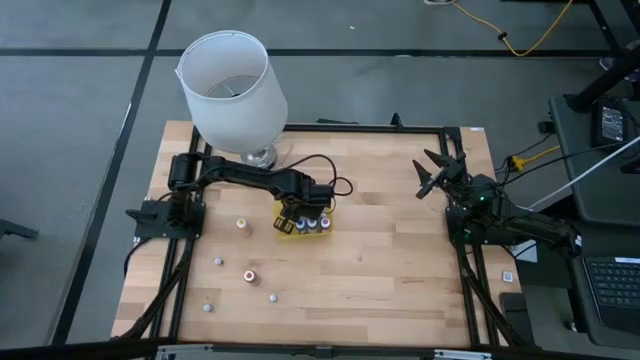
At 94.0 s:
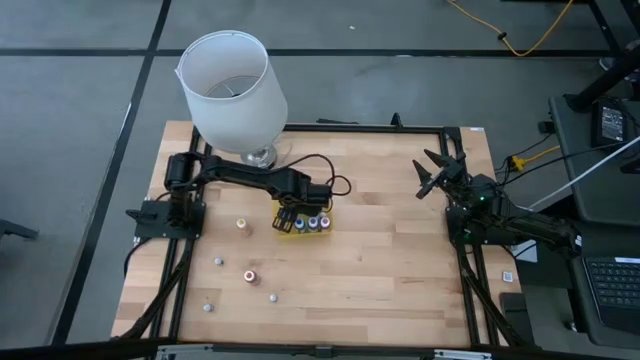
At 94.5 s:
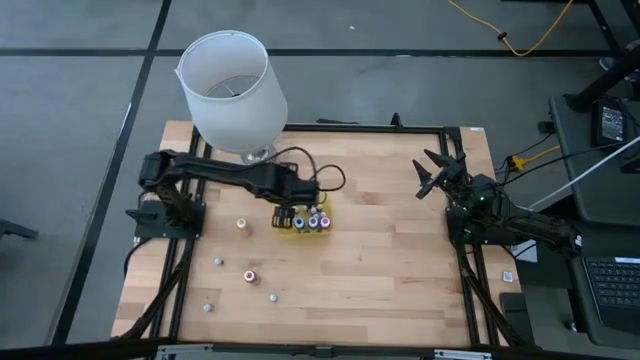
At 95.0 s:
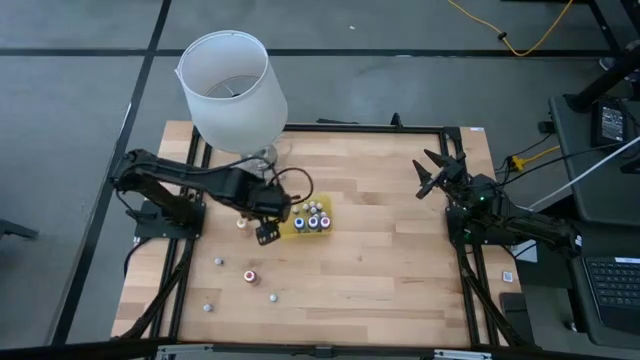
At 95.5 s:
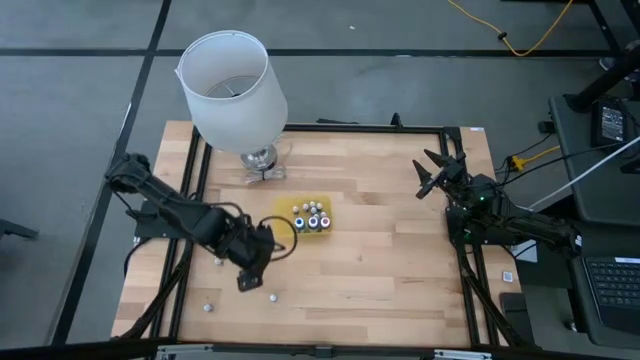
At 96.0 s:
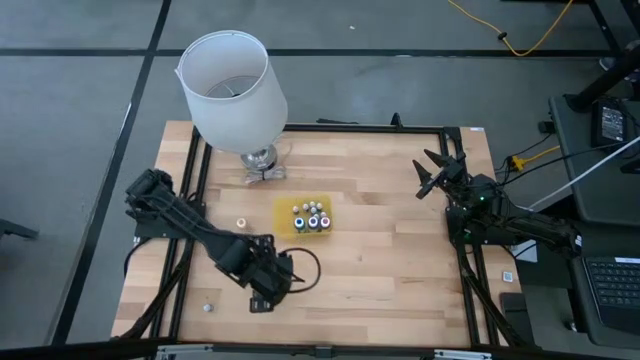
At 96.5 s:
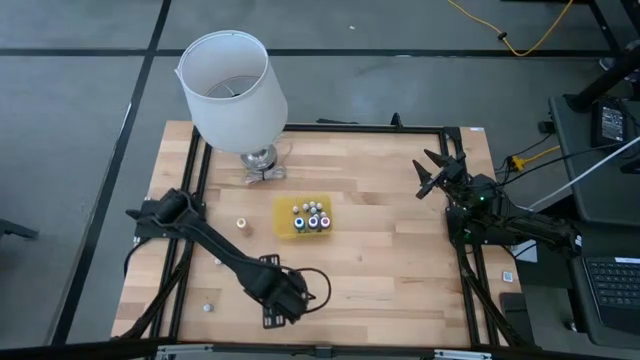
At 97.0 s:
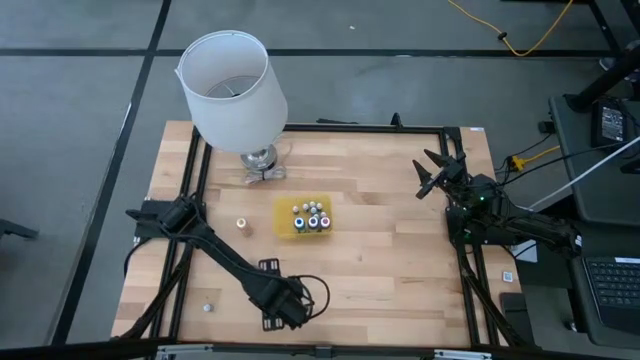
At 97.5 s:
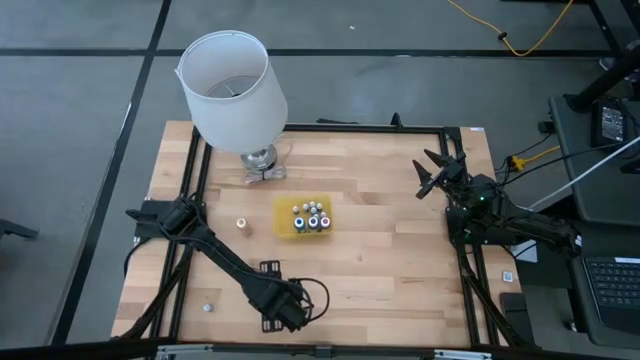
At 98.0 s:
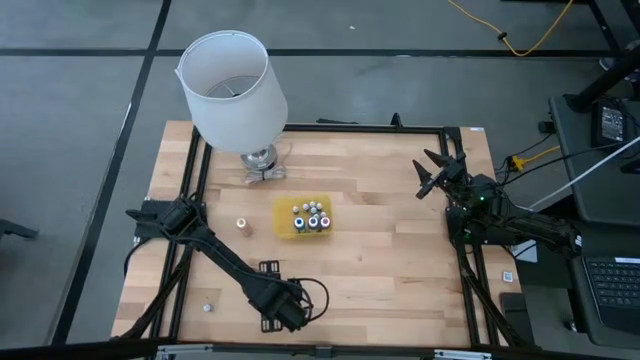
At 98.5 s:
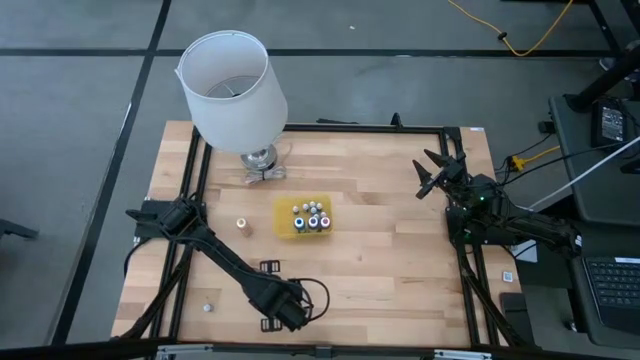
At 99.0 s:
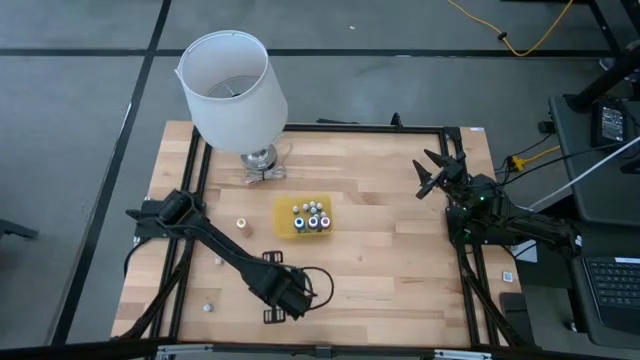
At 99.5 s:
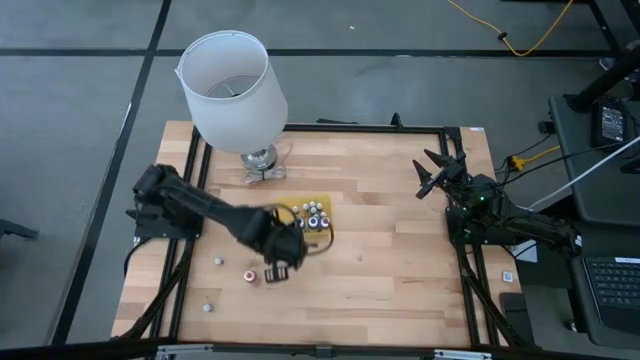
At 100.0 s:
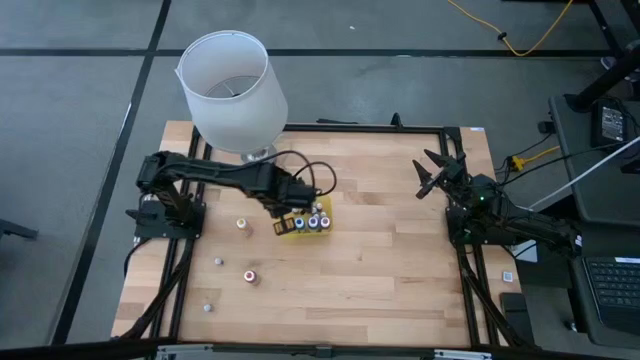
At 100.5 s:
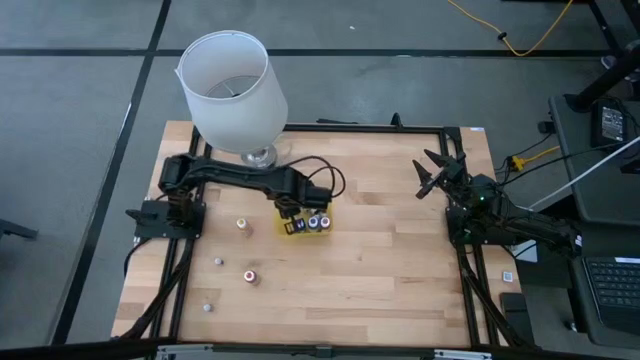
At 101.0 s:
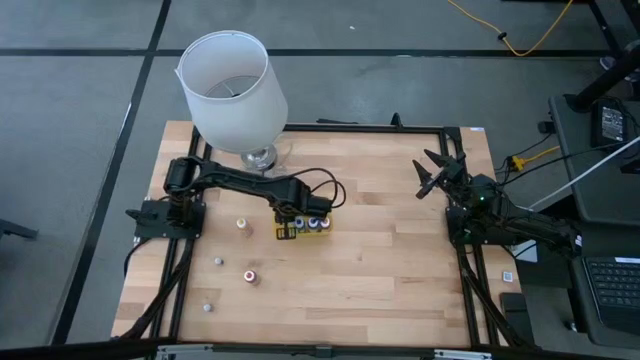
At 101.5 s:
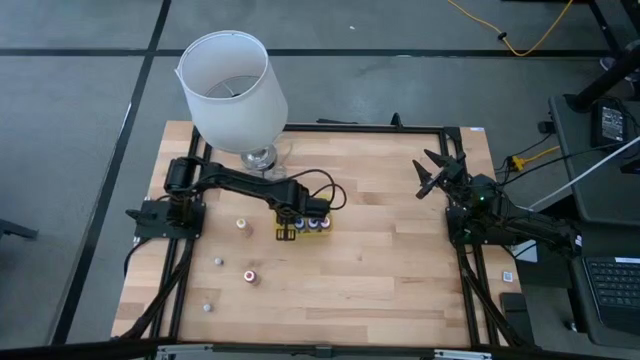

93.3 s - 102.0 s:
Task: Pick & Place food coloring
Put the black food coloring bottle into the yellow bin

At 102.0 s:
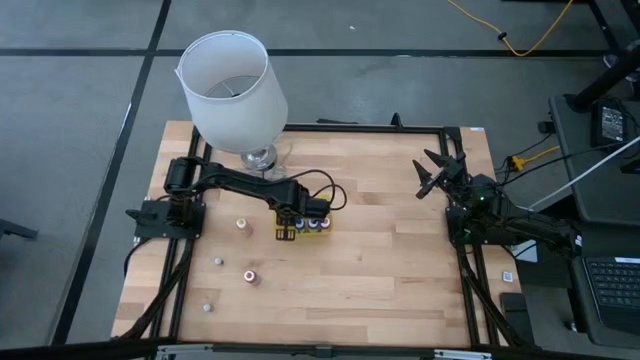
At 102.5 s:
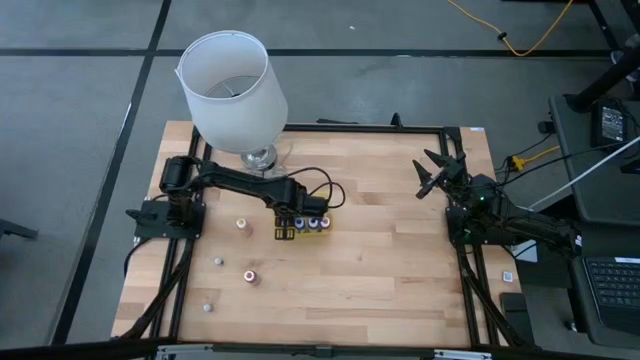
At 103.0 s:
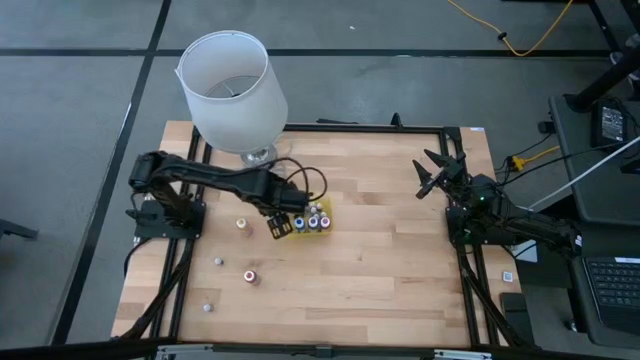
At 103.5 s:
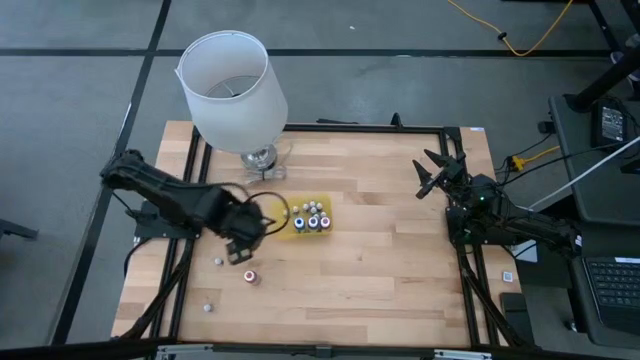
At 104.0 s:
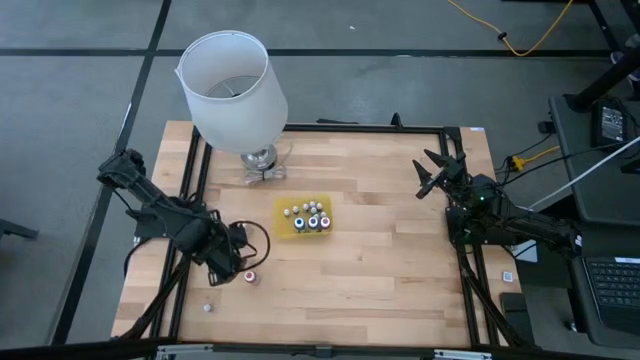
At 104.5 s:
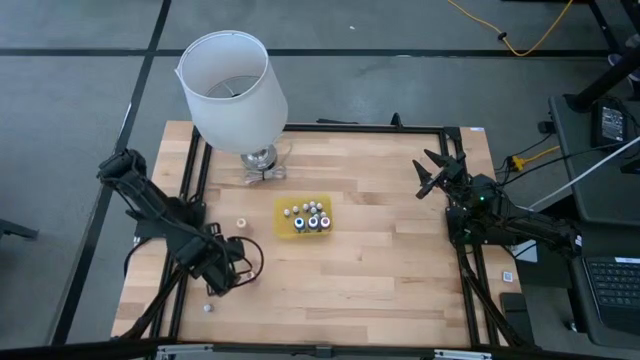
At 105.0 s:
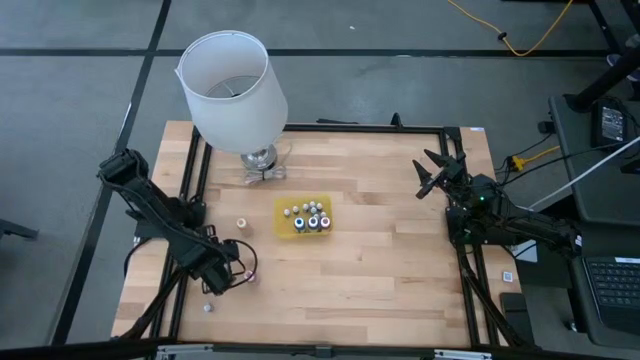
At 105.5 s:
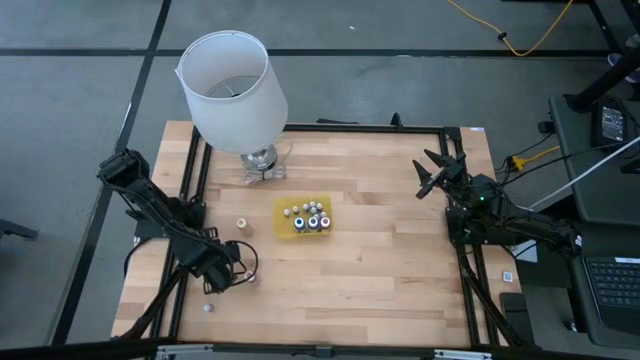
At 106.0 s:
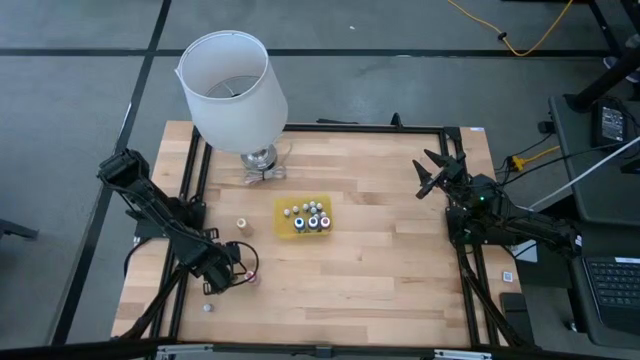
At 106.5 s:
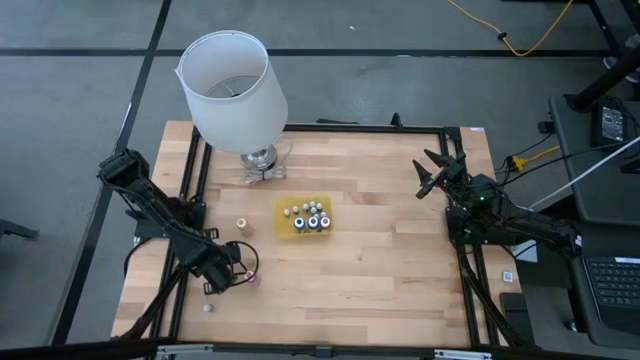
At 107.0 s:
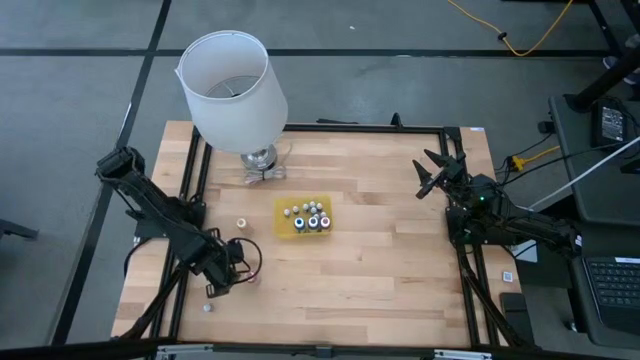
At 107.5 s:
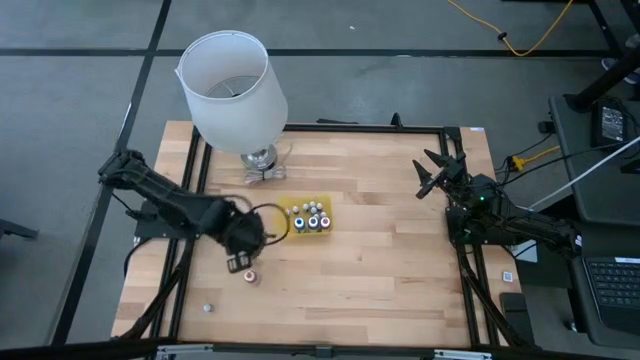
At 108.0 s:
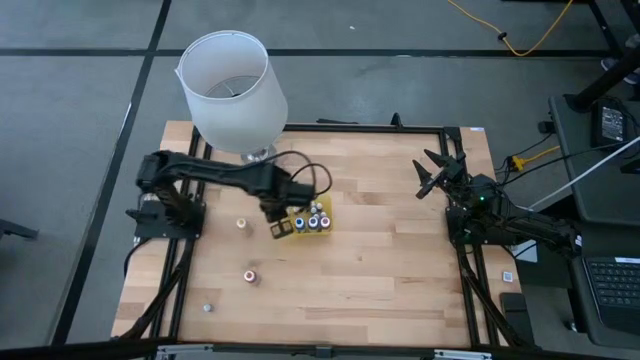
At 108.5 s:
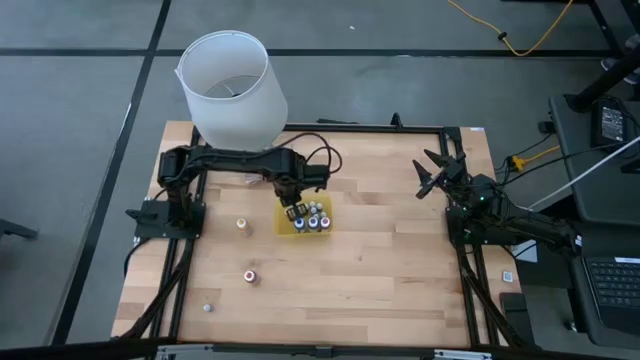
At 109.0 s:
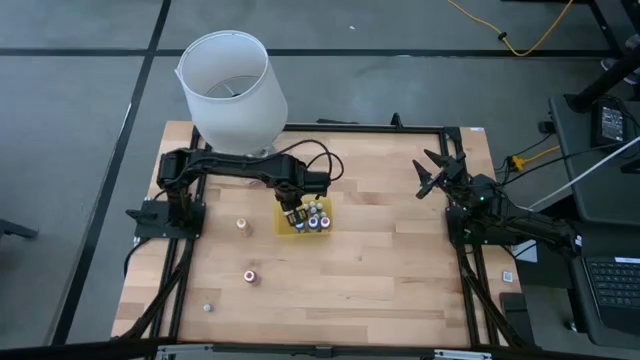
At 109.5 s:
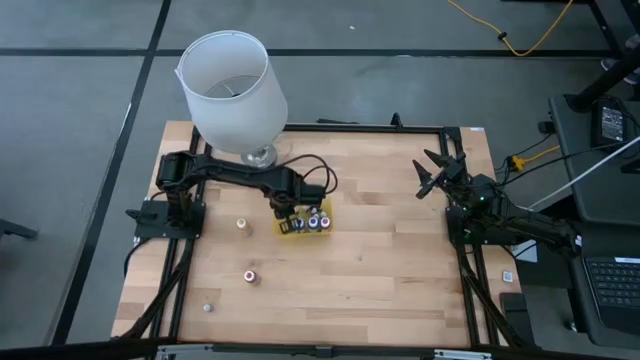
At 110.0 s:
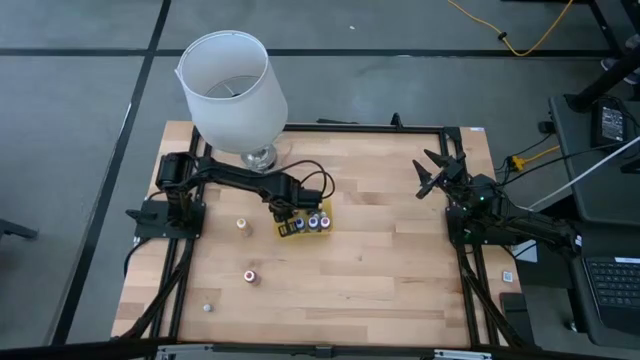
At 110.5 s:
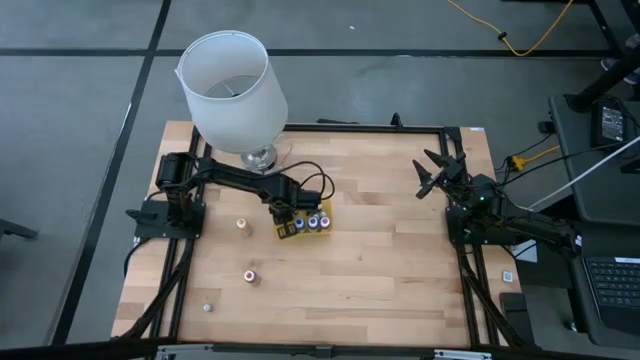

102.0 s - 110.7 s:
Put the black food coloring bottle into the yellow bin

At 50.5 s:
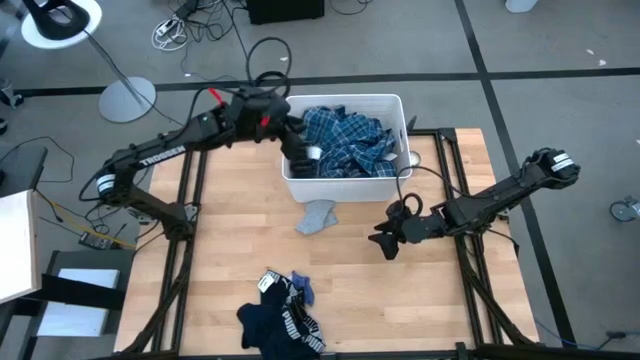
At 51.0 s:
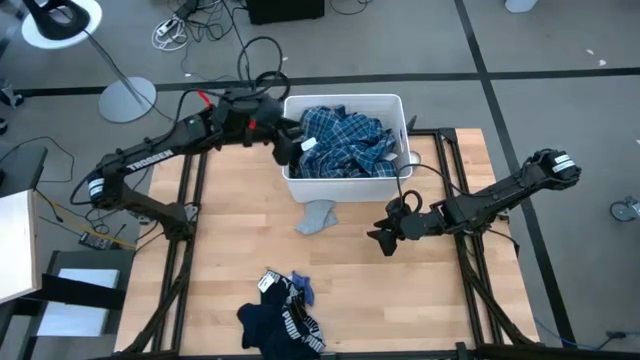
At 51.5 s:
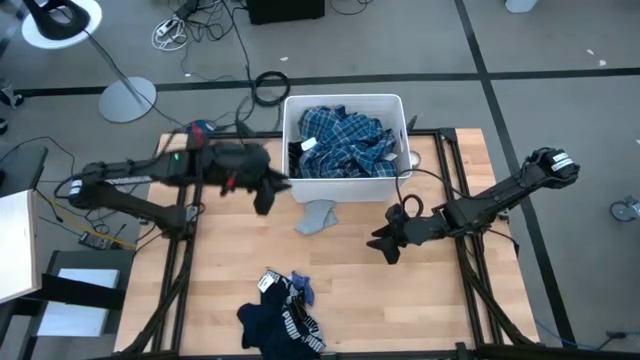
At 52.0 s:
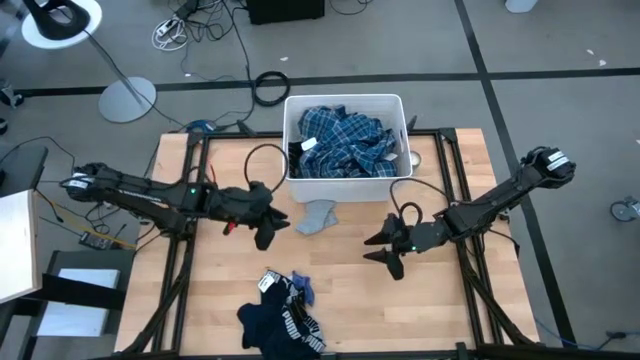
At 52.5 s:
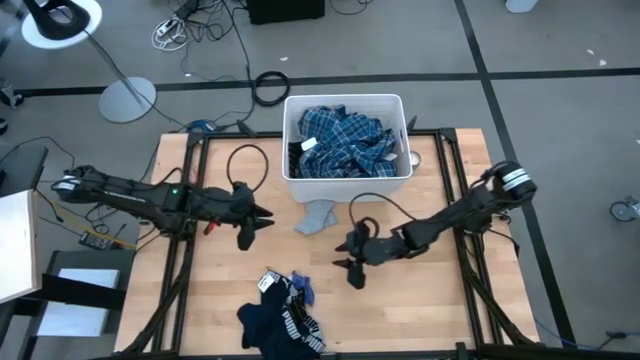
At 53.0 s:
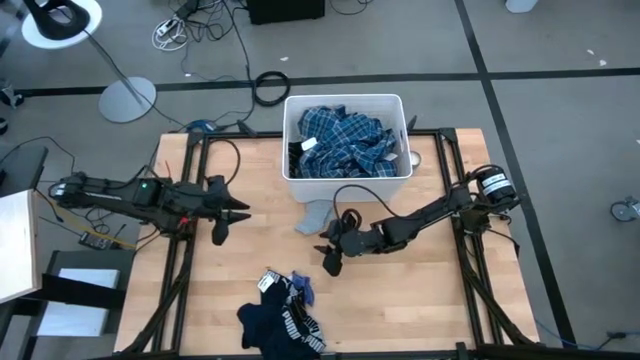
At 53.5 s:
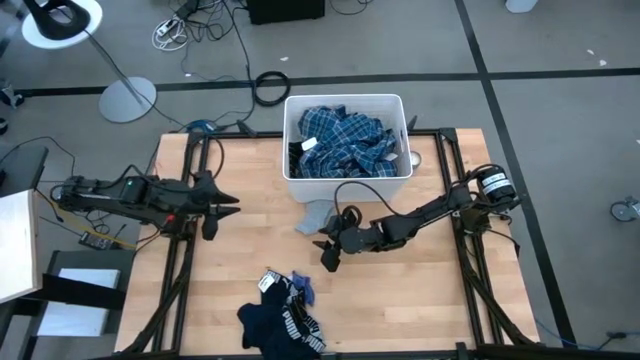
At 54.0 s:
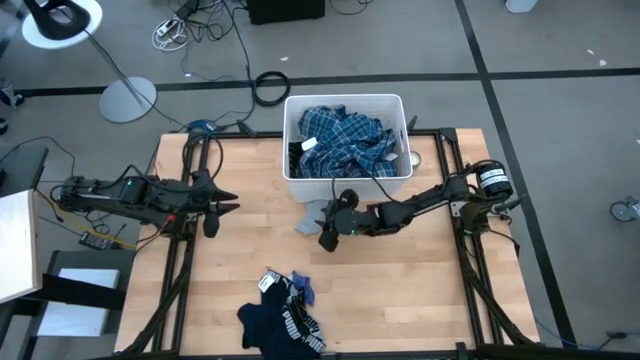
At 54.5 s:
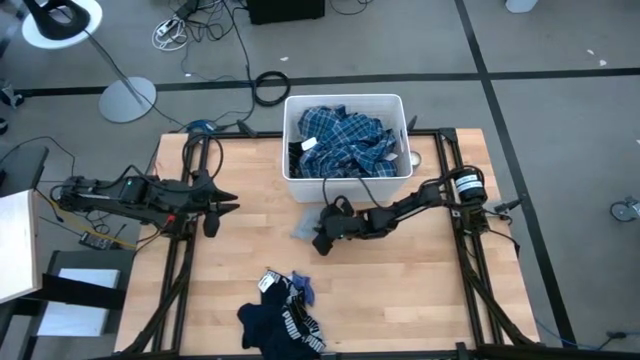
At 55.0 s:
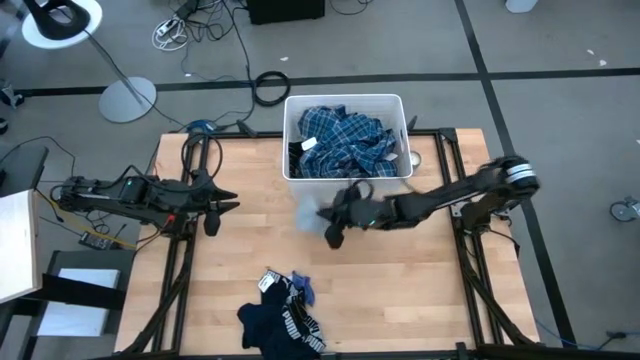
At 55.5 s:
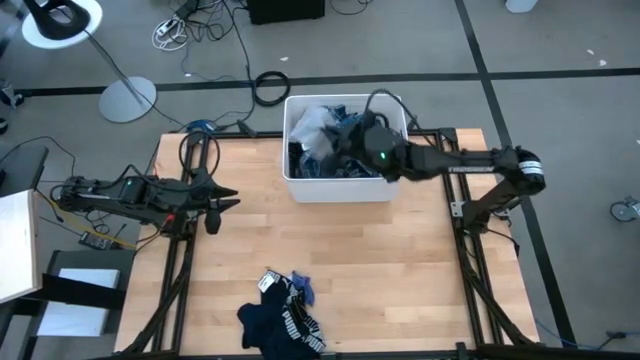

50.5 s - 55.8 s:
Task: Sort clothes
Put the gray sock into the laundry bin
